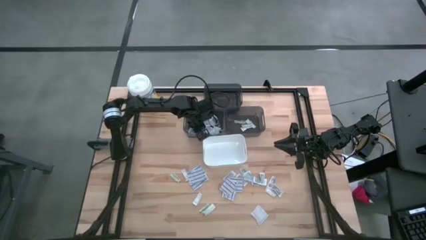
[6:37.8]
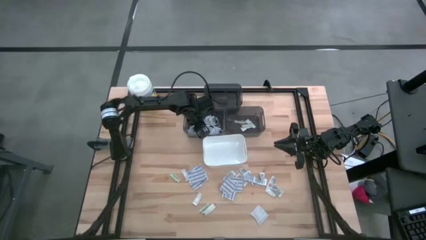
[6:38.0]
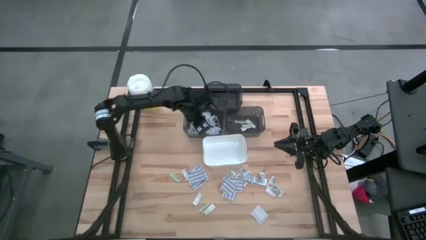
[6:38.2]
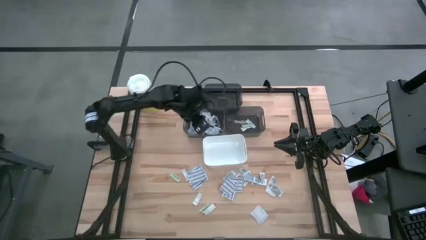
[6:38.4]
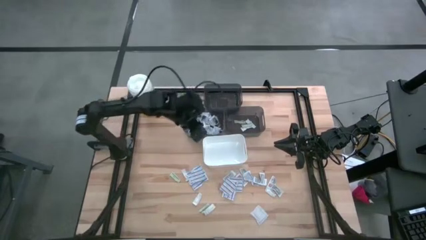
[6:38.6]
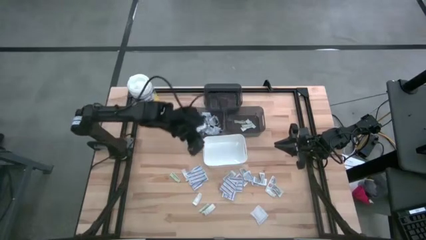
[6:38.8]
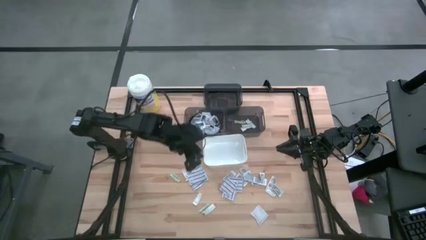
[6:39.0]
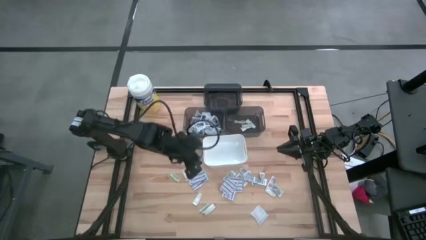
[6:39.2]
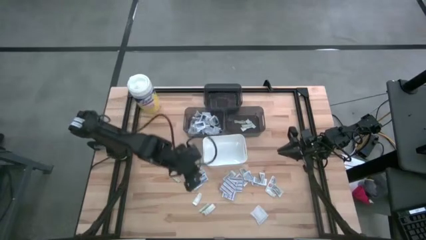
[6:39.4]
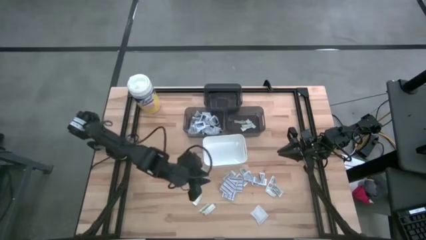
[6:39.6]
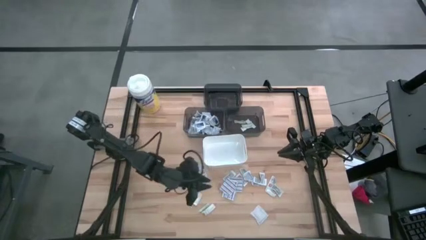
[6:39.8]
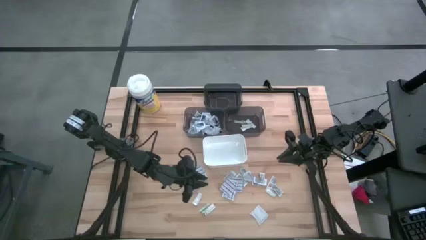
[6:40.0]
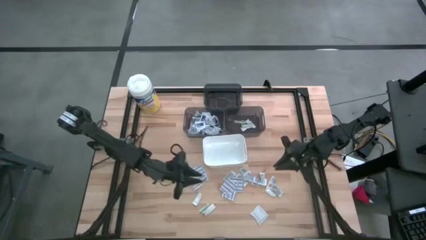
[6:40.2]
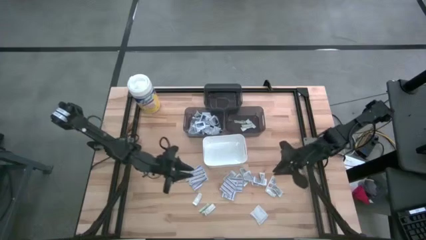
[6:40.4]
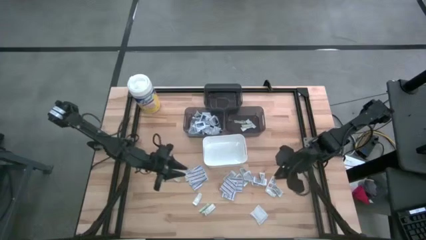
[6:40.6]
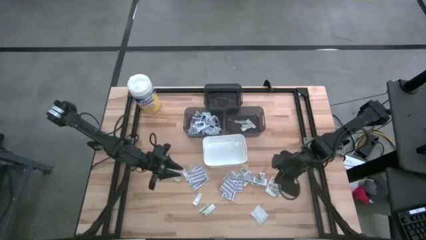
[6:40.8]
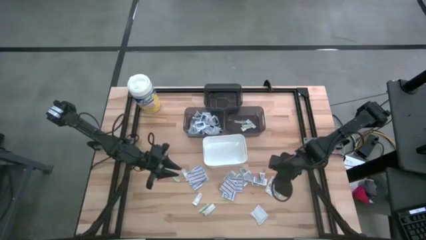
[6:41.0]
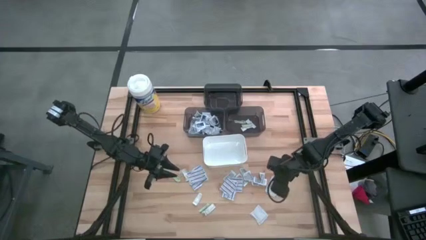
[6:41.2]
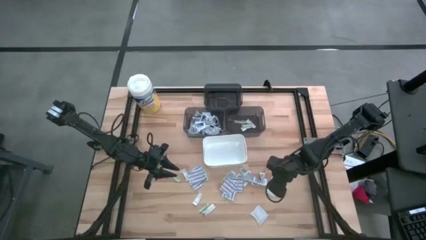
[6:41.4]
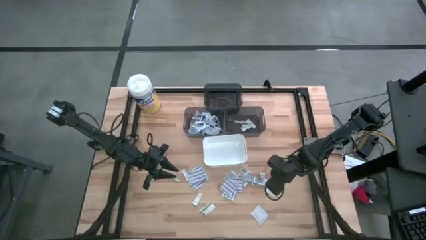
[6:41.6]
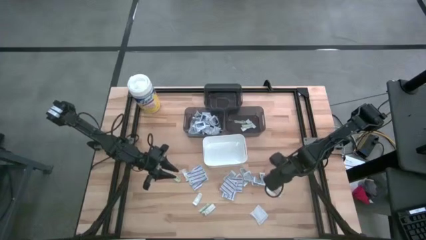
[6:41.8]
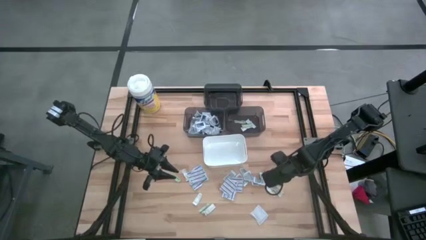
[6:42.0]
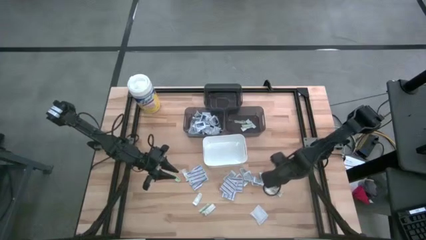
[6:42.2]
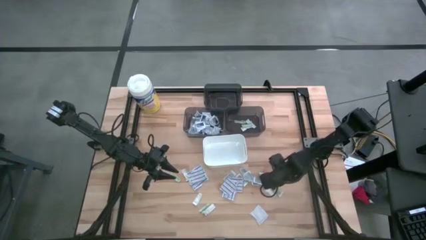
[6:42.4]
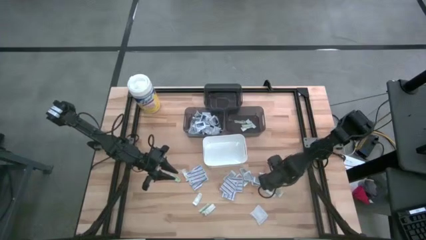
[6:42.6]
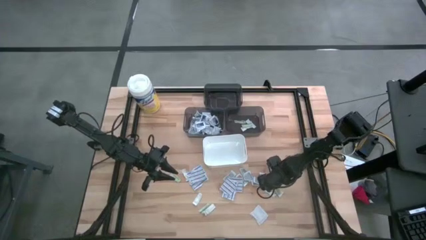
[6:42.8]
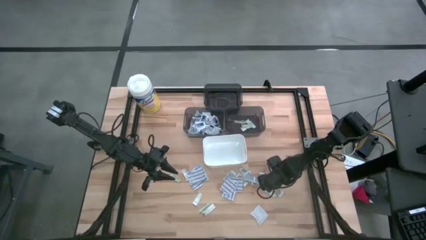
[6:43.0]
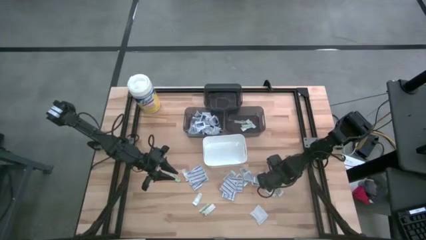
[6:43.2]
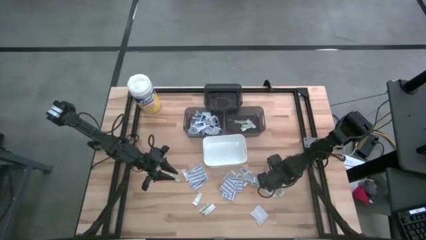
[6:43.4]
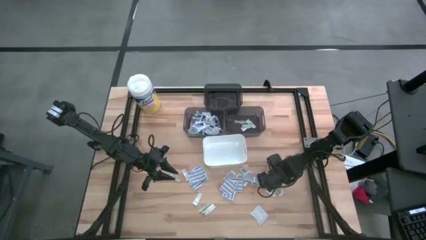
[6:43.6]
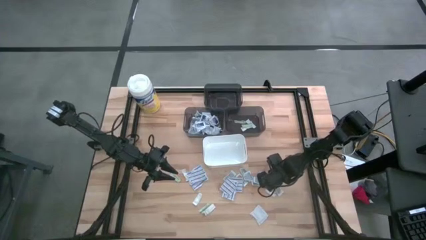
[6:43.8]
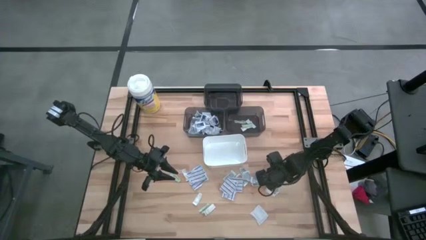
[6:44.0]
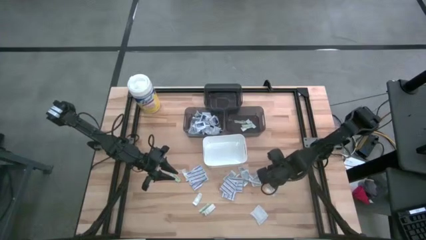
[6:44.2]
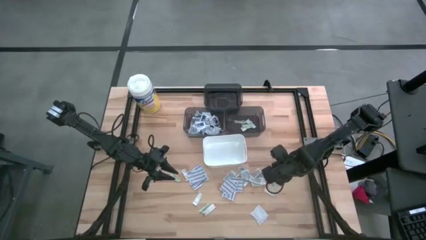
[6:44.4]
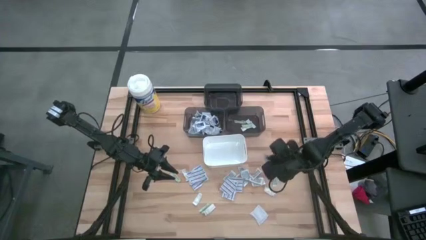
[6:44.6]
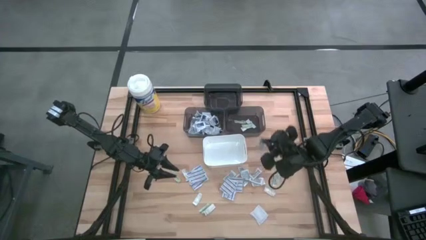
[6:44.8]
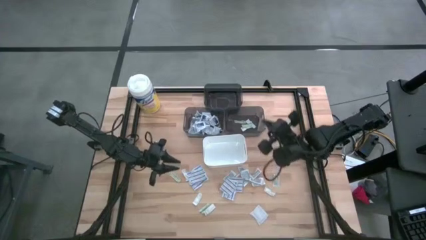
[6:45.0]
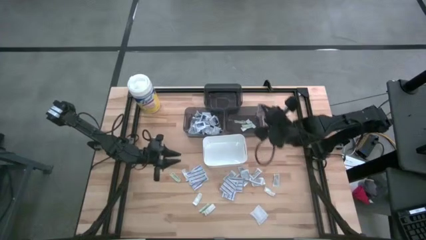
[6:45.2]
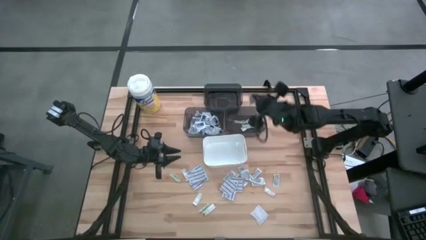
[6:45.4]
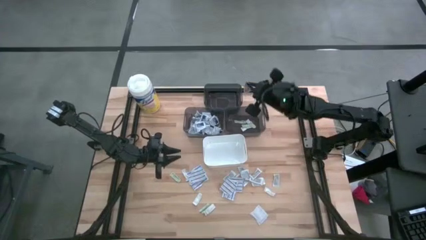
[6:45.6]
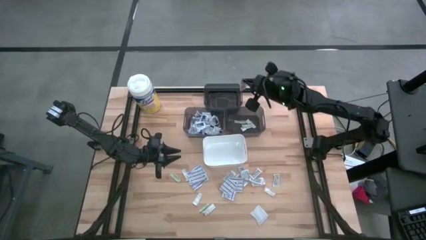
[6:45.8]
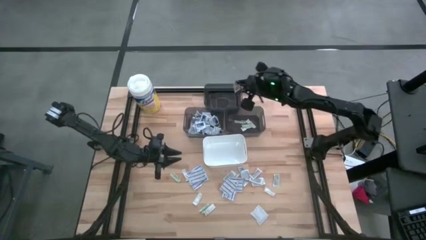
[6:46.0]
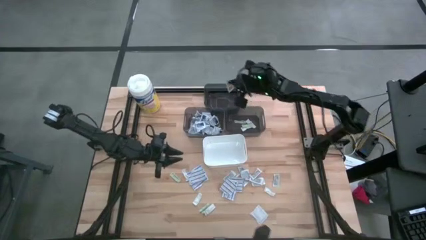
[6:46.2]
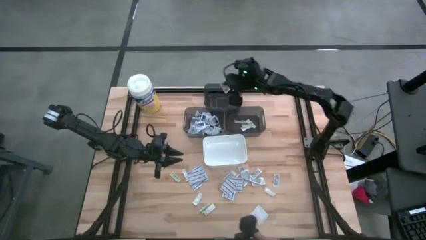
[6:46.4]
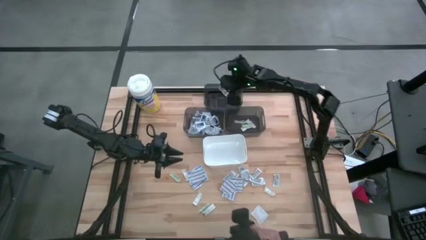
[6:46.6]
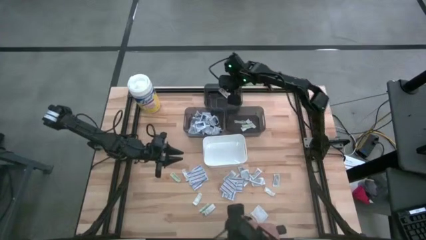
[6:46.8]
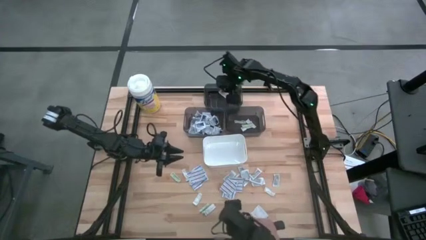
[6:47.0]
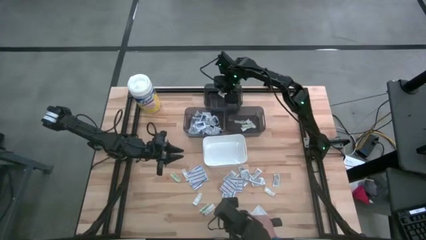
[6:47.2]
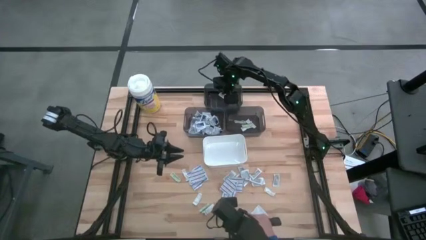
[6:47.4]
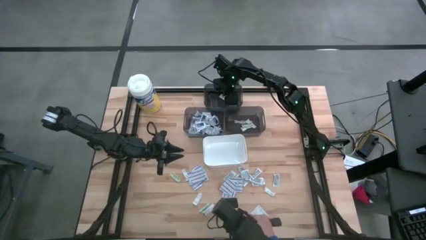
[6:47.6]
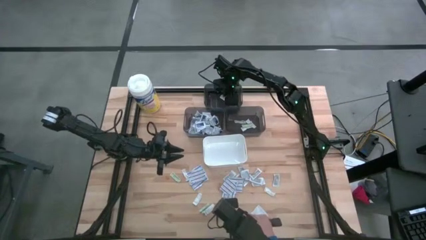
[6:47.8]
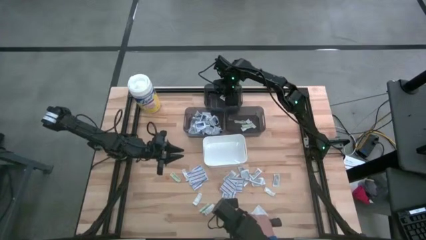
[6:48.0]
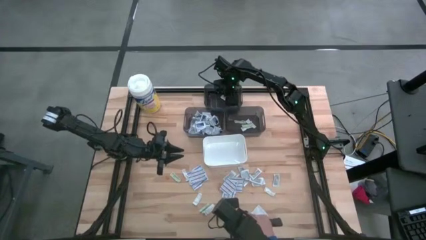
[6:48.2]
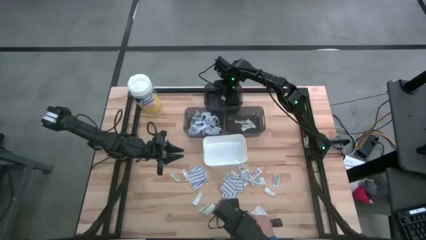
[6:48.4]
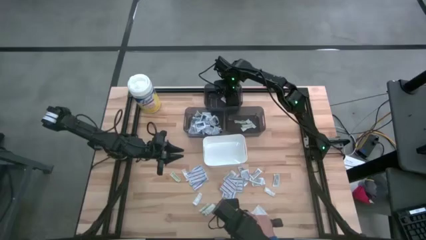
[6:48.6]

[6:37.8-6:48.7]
Task: Pick & Place First Aid Supplies
Put the ointment pack into the top black bin

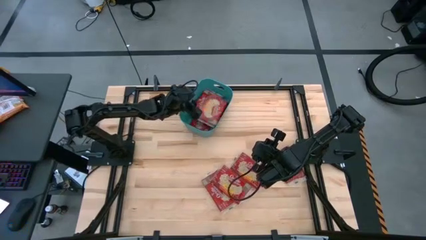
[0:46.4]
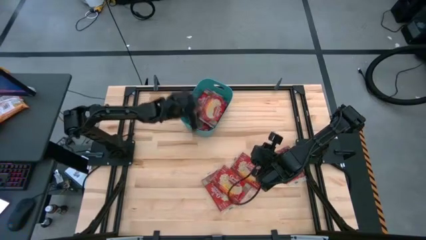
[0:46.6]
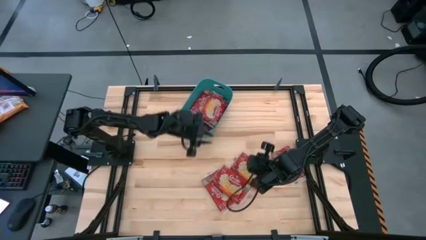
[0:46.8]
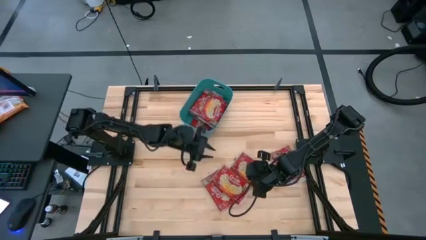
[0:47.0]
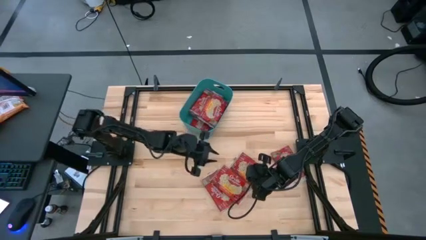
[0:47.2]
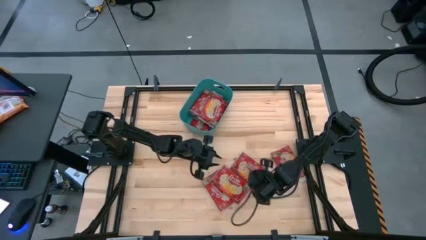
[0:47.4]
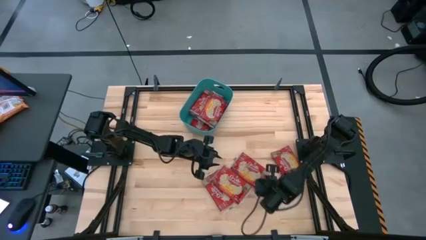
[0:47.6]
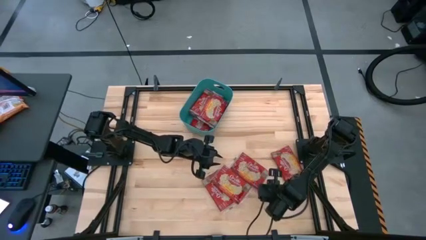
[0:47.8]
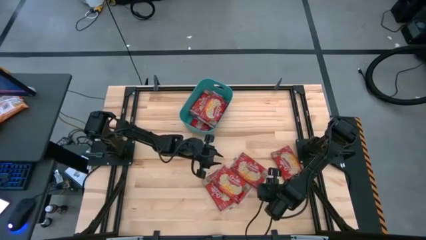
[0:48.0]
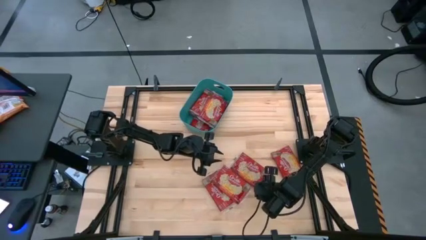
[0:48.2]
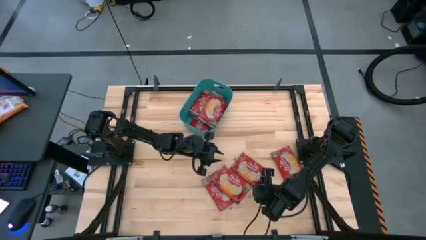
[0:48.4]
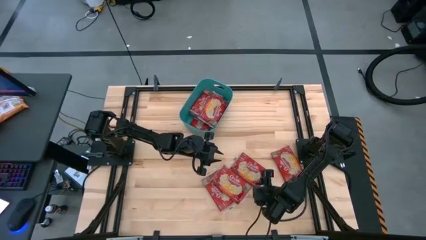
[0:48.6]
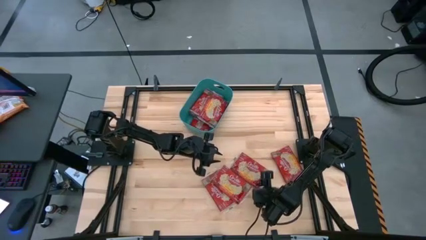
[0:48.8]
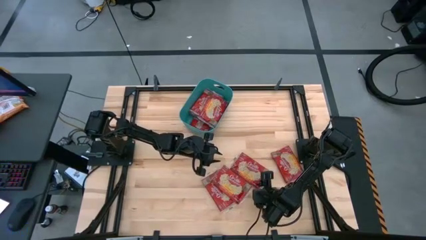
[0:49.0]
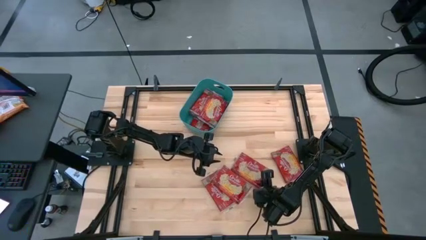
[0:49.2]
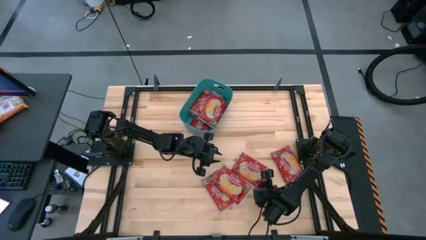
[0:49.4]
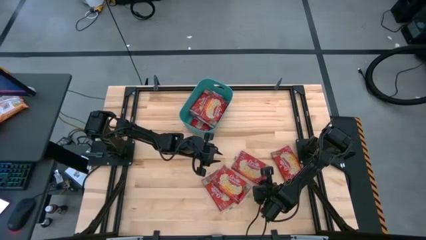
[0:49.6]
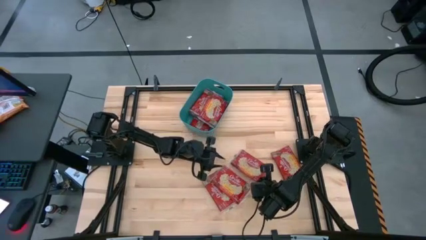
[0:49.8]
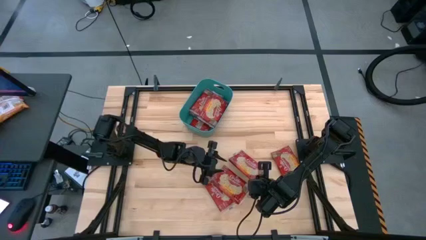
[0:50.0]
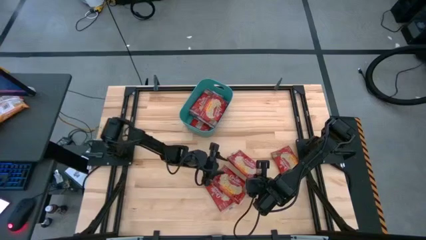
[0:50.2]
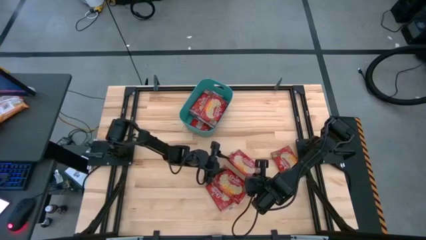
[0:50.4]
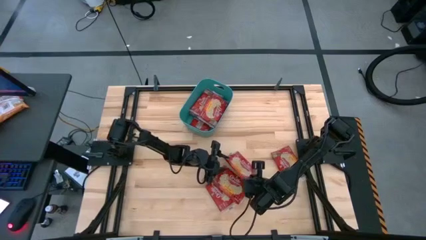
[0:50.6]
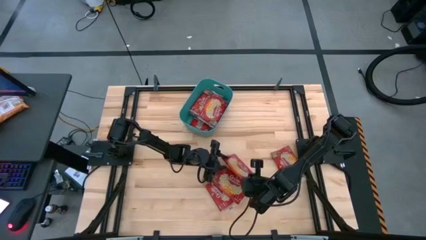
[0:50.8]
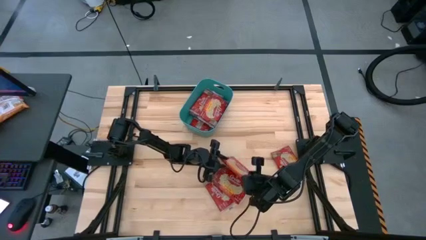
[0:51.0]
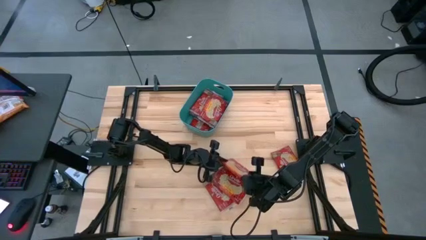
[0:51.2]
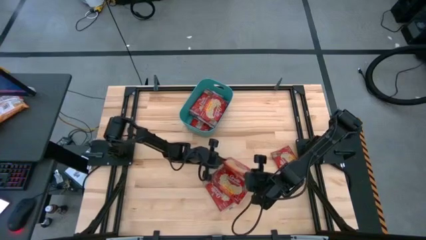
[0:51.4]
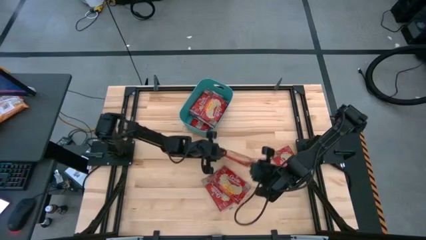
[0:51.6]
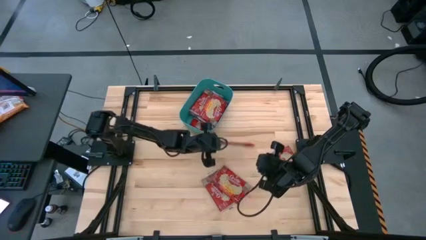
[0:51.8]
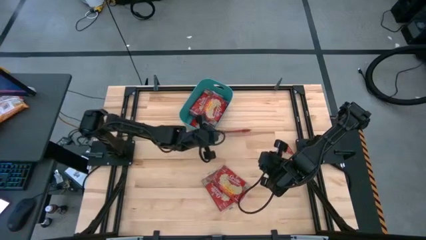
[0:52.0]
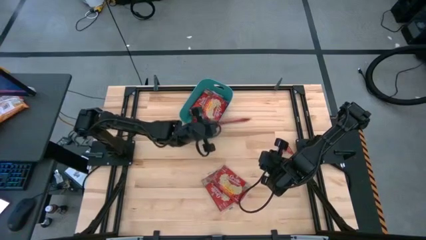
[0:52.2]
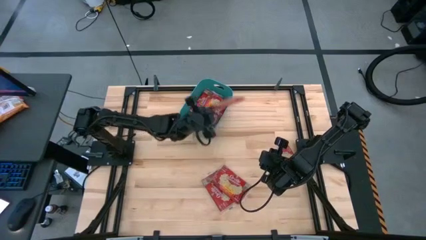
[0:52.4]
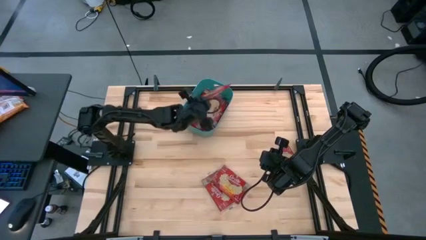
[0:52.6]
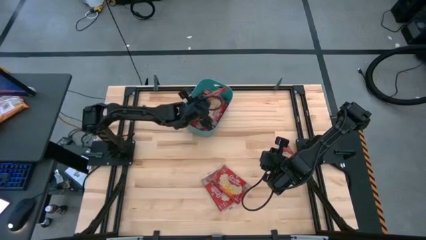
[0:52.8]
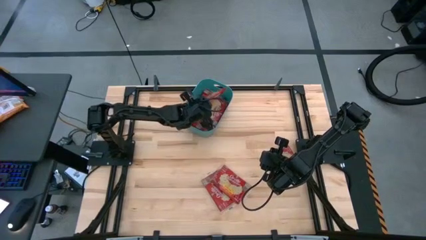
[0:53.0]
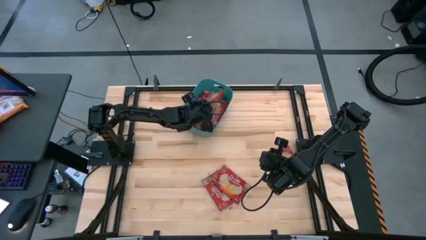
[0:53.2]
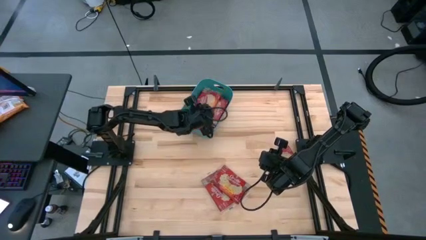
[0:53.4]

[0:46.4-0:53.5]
Task: Sort popcorn bags into baskets
Put the popcorn bag into the green bin
